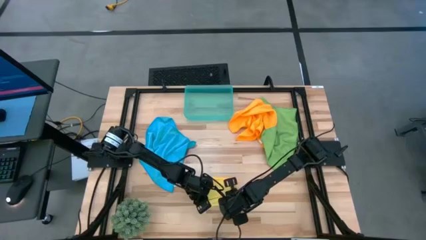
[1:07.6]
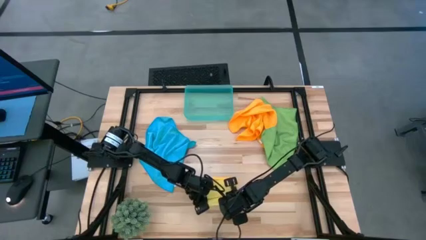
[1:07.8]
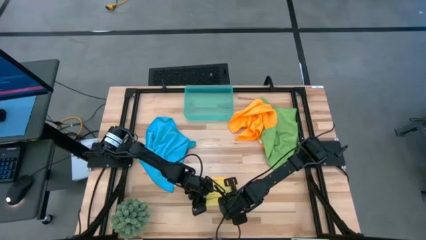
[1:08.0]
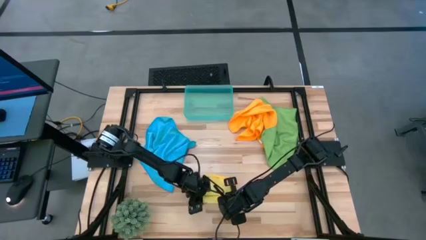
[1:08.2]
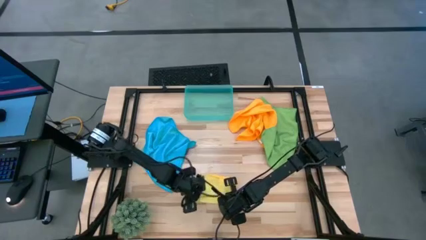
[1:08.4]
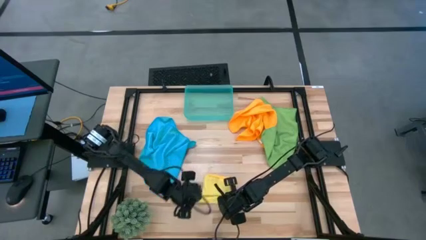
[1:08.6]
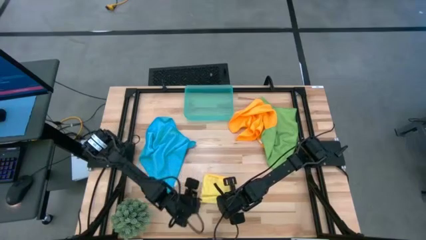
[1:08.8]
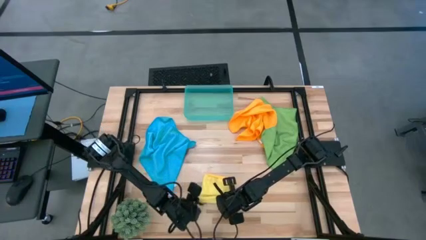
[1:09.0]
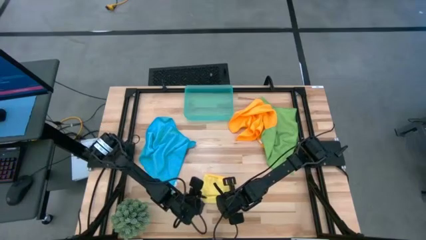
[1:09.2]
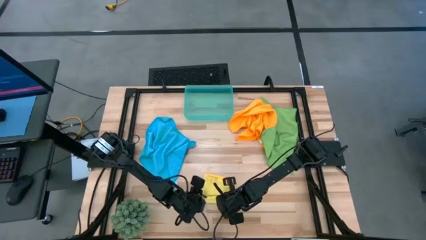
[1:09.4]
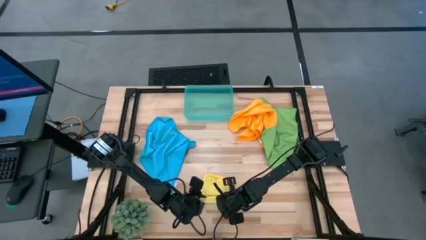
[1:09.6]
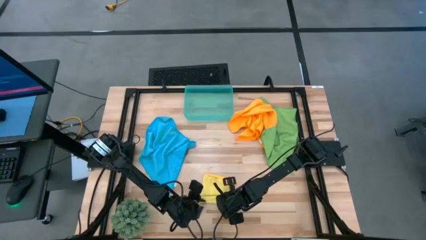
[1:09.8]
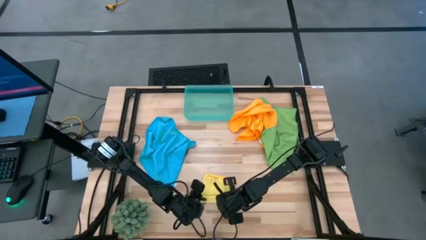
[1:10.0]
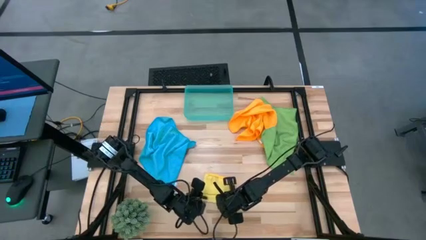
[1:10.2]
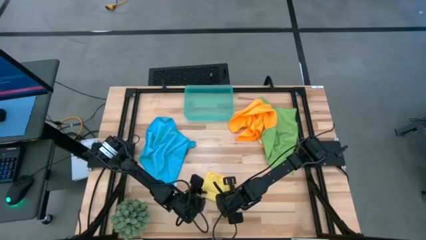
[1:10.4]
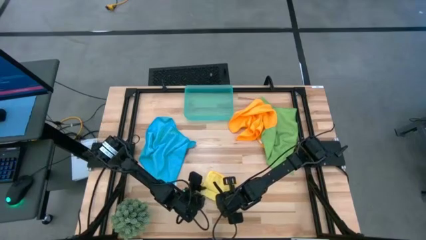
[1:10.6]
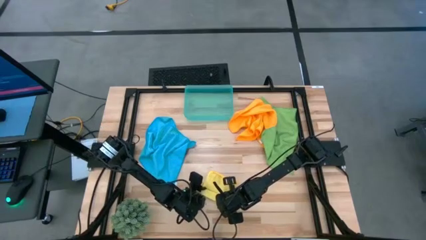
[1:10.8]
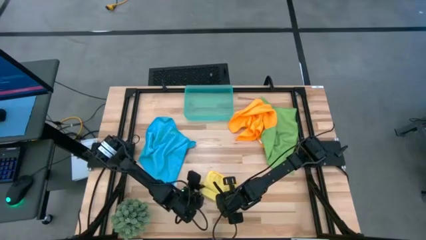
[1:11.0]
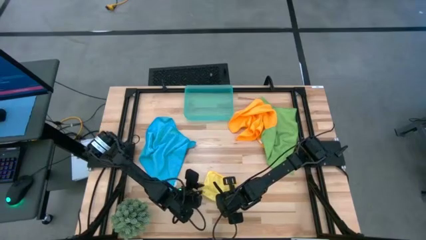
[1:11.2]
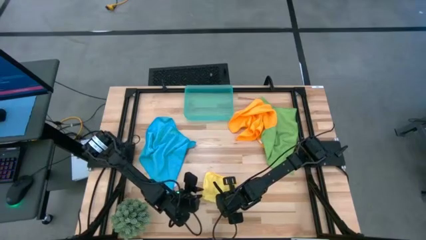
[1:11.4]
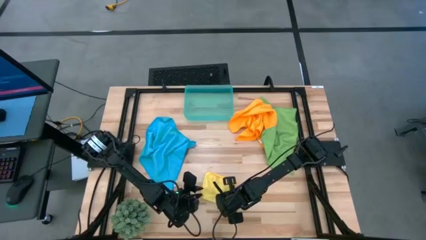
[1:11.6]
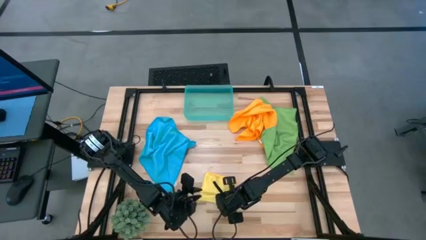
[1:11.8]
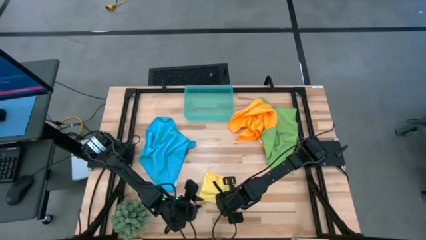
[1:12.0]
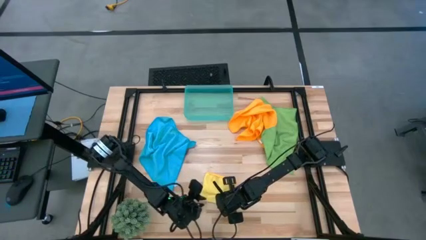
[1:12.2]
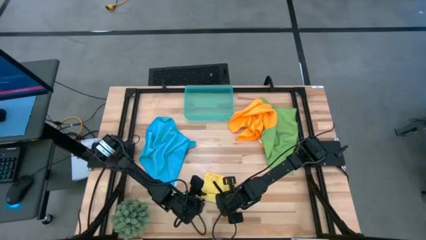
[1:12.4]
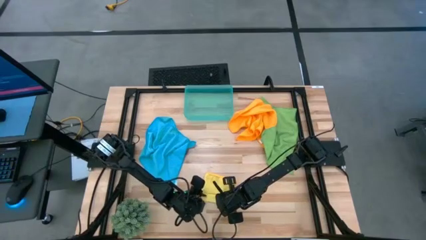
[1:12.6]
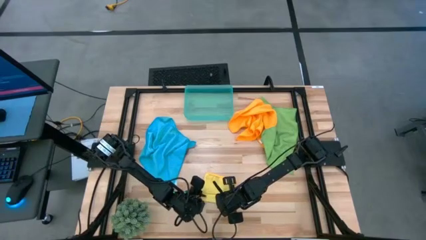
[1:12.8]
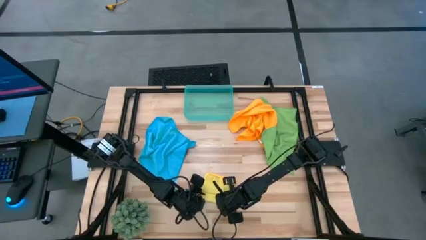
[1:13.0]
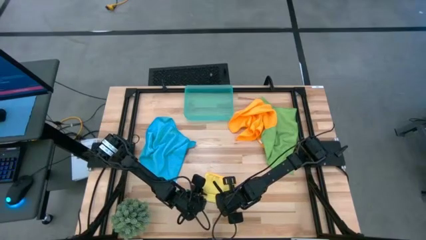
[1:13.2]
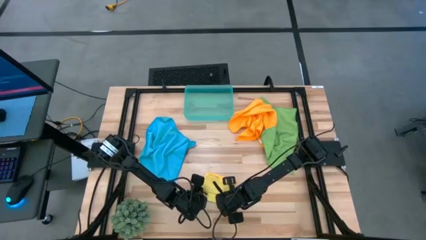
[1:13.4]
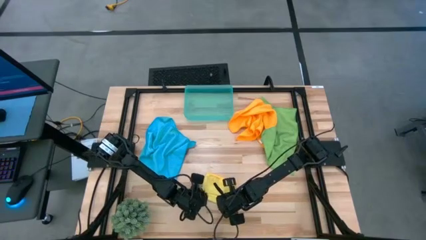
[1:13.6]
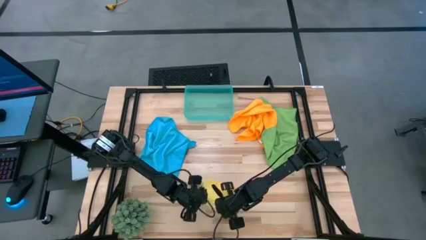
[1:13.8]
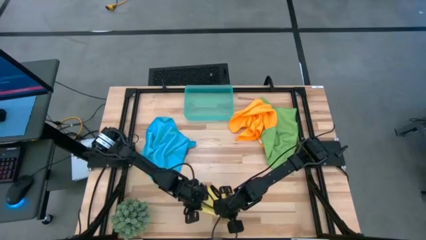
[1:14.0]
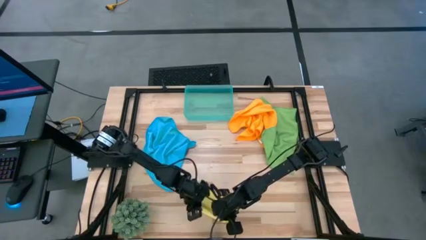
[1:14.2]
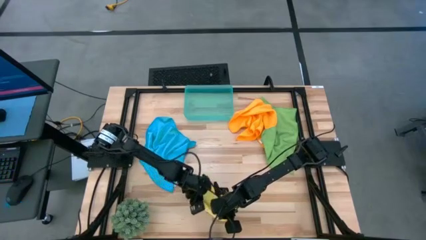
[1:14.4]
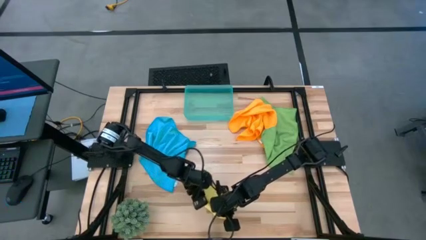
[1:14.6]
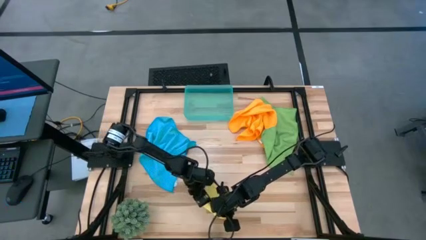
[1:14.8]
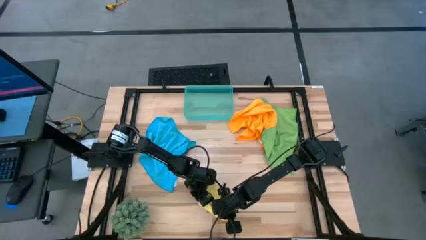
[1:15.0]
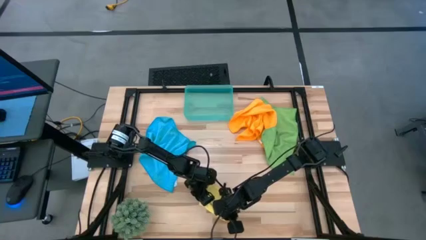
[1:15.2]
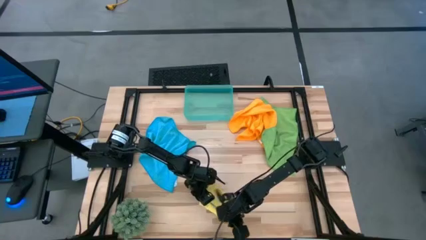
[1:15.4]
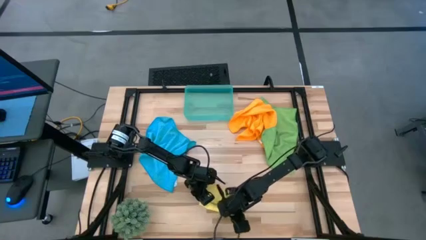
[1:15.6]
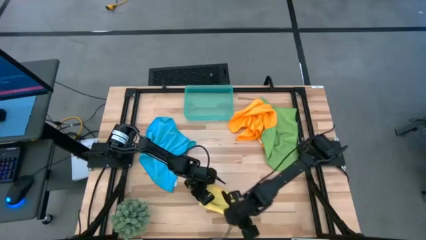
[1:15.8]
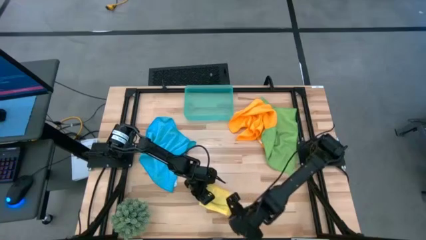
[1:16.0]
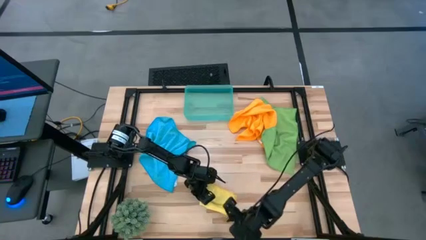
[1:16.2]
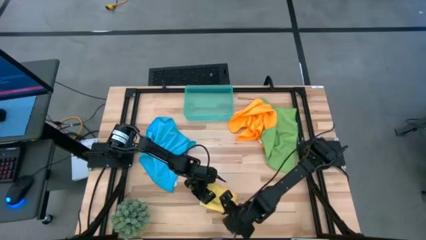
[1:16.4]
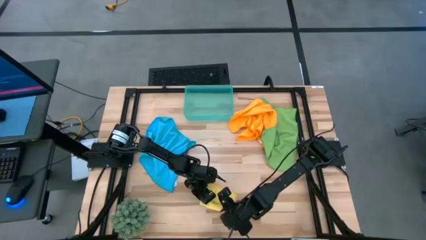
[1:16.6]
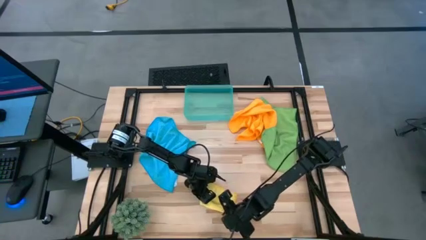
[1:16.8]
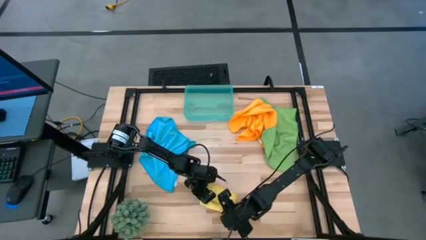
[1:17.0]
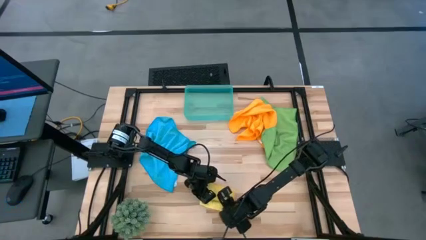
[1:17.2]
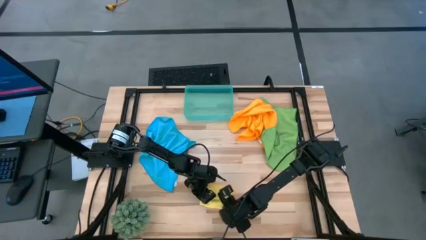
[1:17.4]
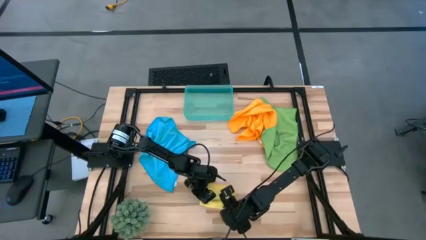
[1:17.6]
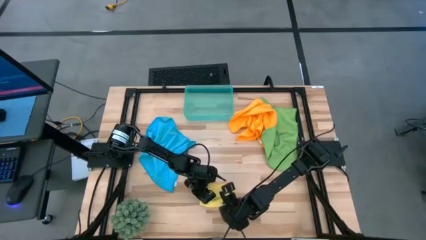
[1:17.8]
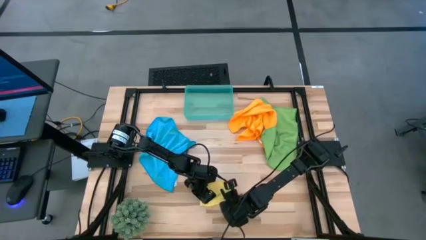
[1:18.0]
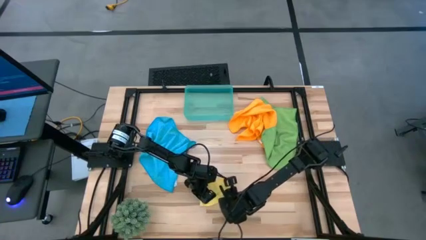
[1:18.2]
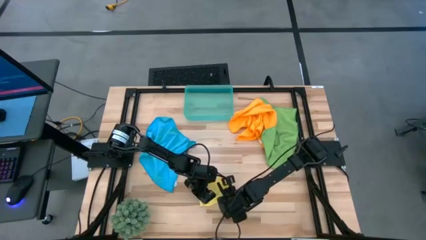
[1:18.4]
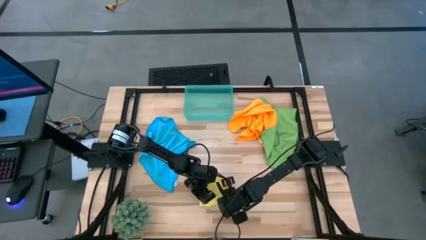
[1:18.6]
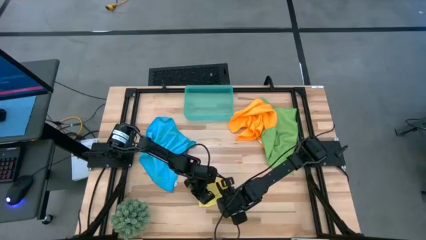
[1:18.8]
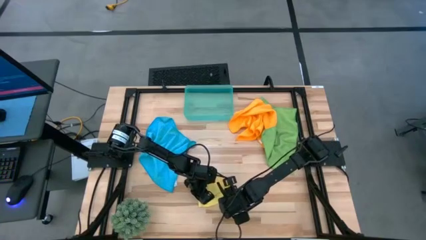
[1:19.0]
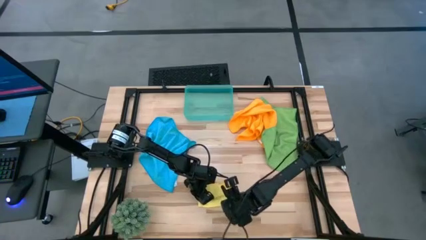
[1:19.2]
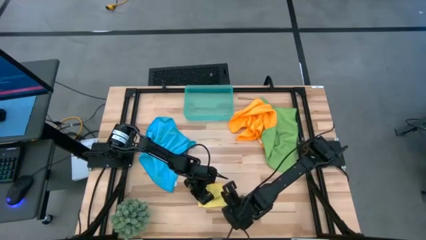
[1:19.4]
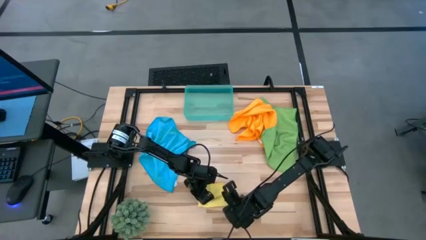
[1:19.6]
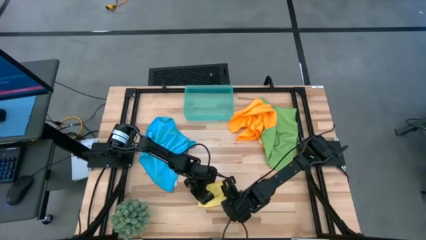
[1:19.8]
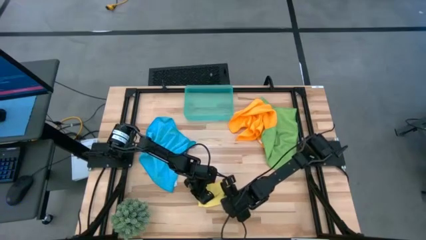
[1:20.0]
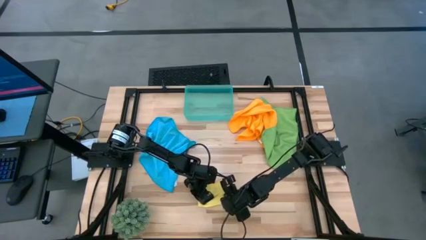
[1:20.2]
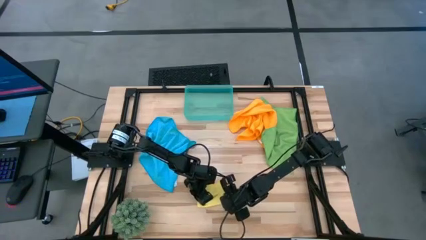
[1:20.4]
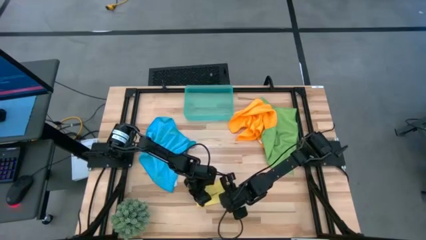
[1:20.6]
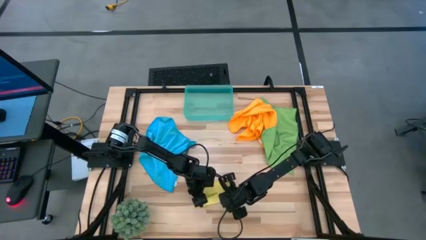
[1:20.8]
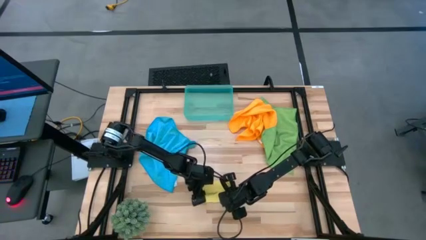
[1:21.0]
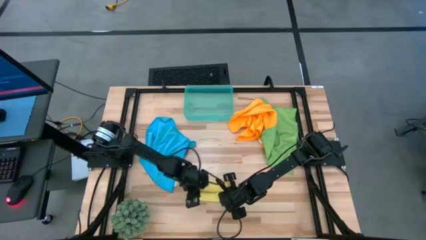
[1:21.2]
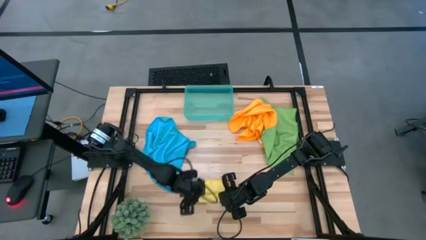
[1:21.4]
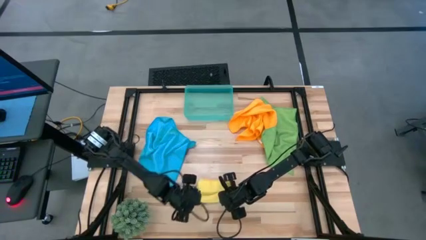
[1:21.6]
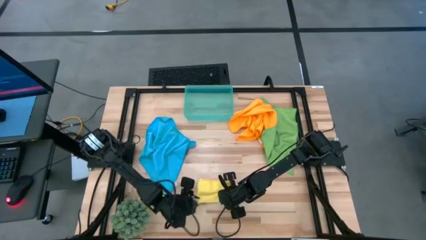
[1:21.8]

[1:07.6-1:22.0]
Task: Roll microfiber towels into tight, uniform cylinder then place into a basket
Roll the yellow microfiber towel

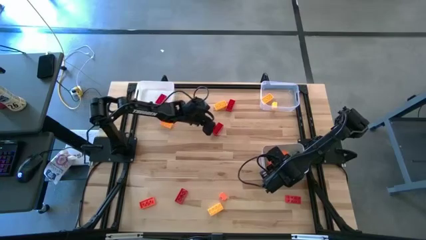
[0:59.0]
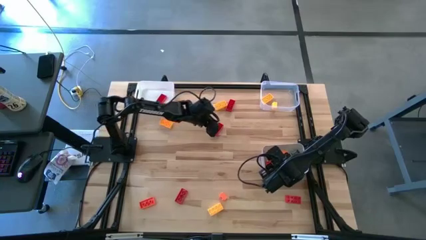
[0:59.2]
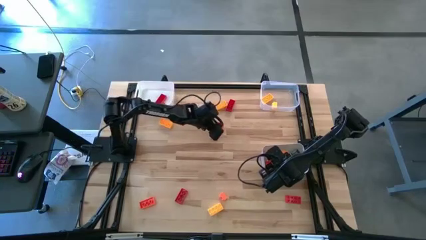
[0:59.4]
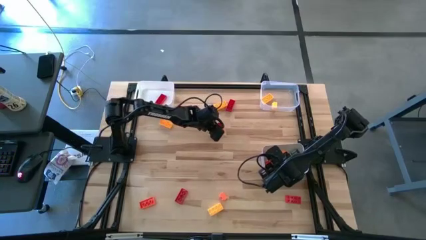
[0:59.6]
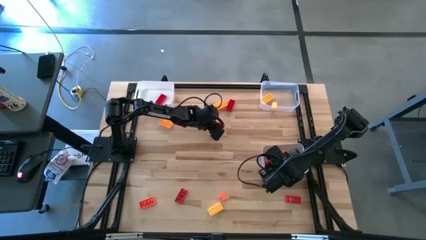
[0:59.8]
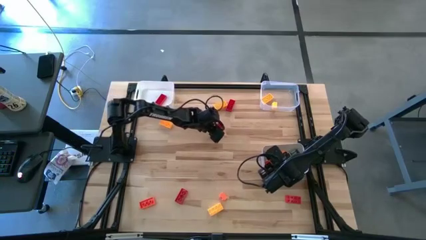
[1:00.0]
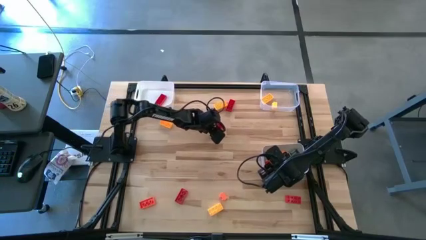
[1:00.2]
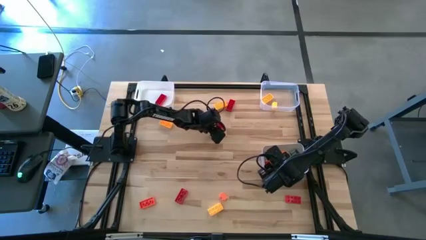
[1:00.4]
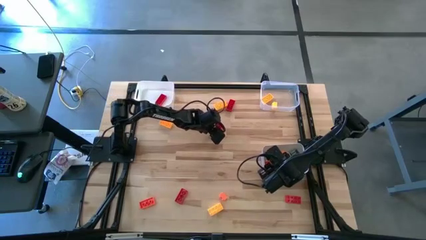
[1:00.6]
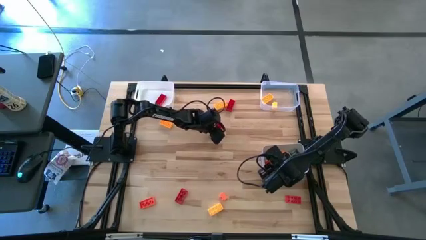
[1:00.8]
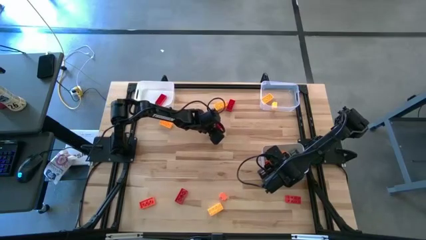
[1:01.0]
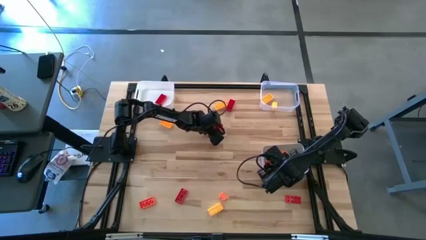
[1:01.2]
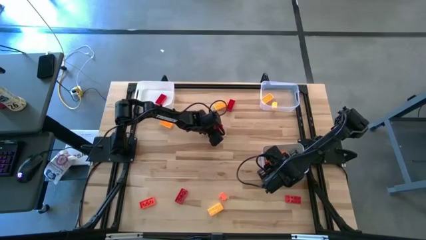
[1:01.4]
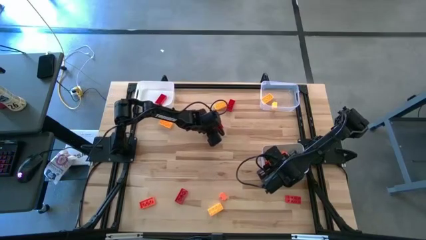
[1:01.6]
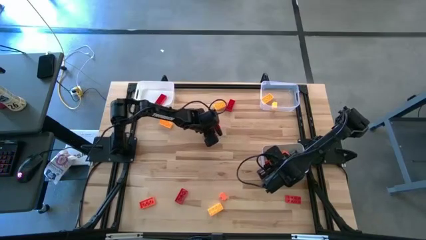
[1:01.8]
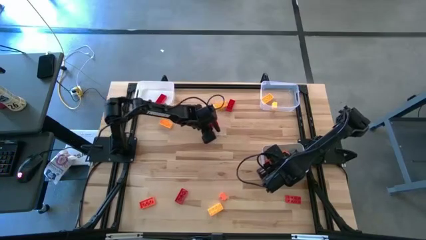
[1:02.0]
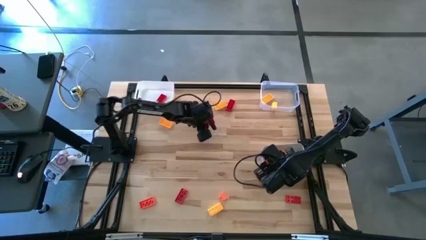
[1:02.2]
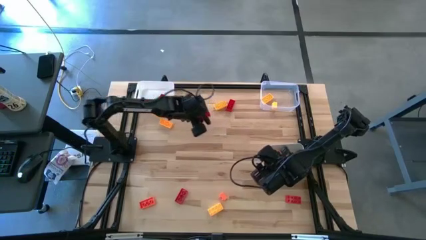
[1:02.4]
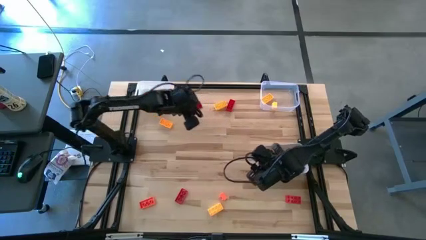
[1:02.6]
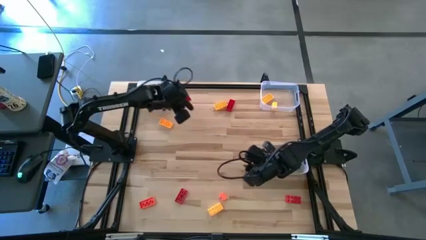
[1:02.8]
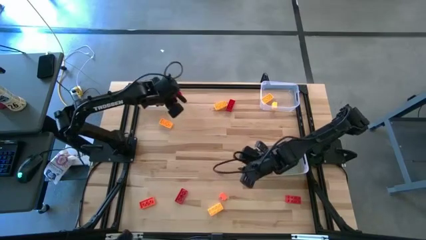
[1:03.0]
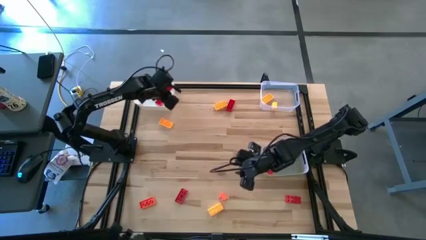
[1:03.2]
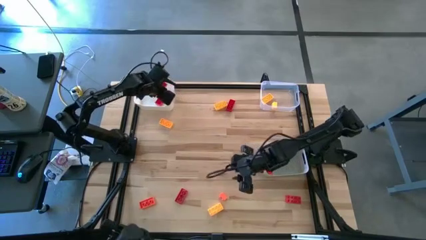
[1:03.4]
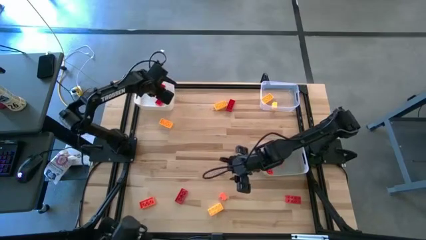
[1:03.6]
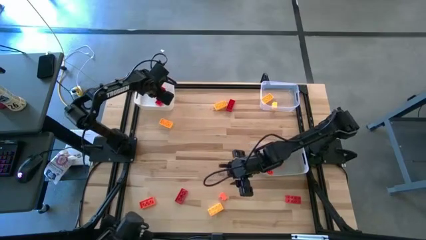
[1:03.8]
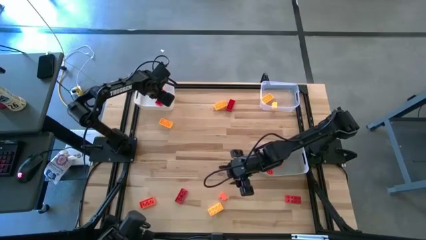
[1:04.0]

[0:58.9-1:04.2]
Task: Sort & place blocks by color
Put the red game piece into the white bin
